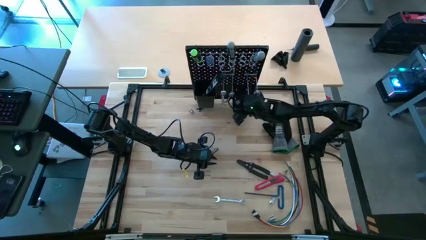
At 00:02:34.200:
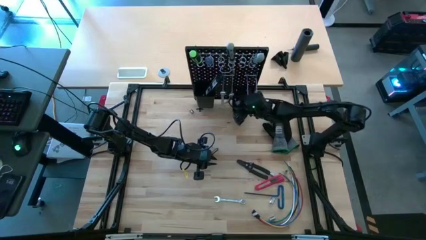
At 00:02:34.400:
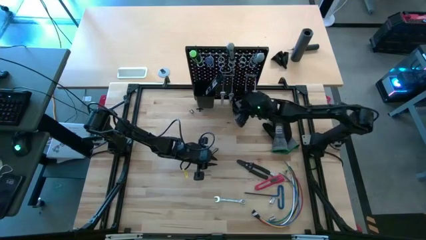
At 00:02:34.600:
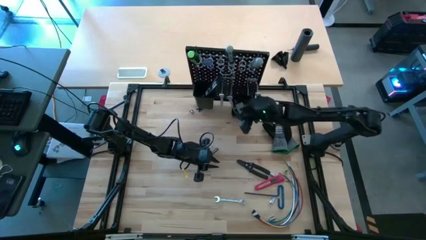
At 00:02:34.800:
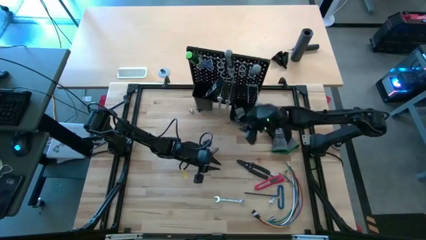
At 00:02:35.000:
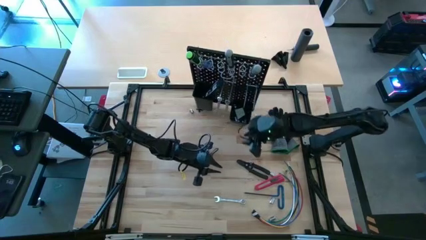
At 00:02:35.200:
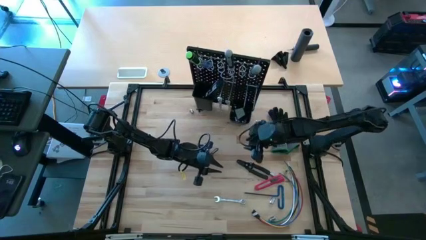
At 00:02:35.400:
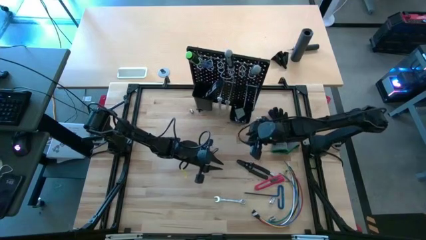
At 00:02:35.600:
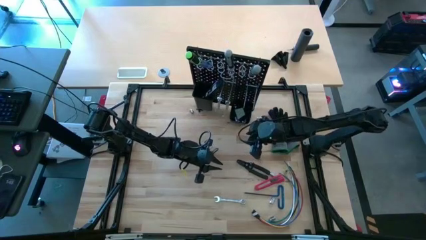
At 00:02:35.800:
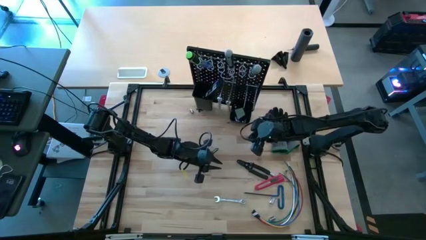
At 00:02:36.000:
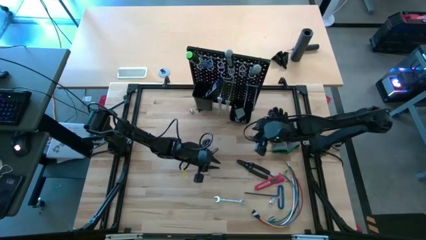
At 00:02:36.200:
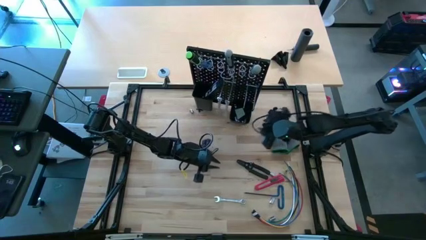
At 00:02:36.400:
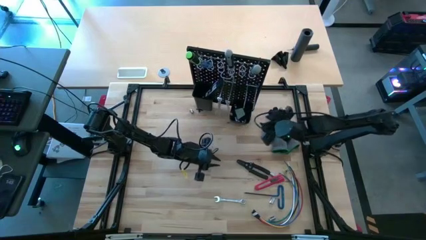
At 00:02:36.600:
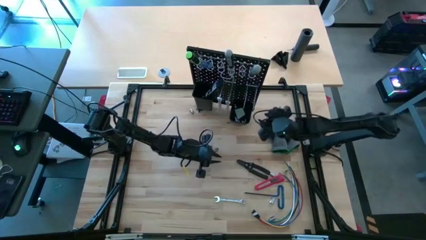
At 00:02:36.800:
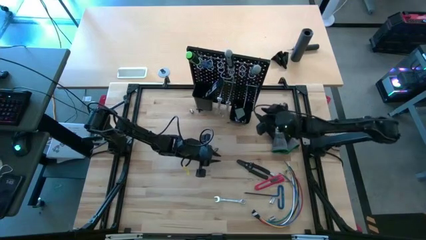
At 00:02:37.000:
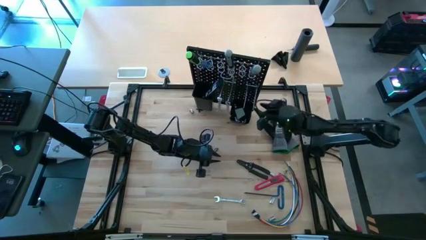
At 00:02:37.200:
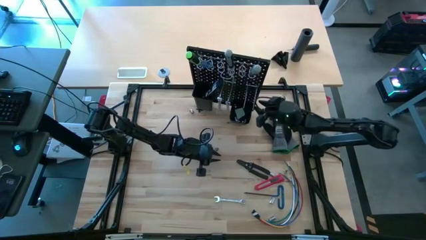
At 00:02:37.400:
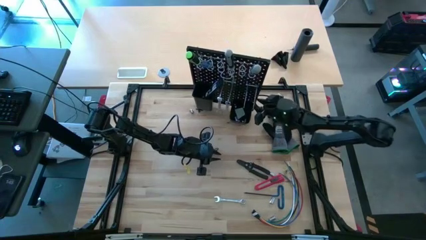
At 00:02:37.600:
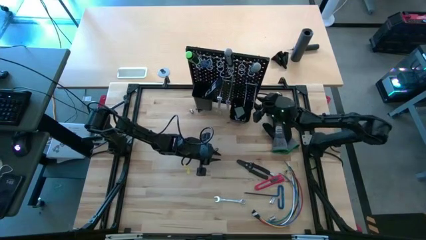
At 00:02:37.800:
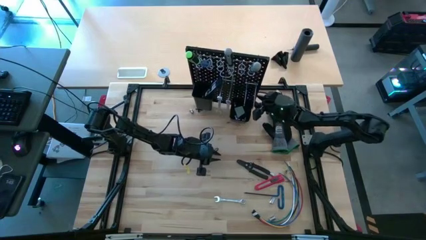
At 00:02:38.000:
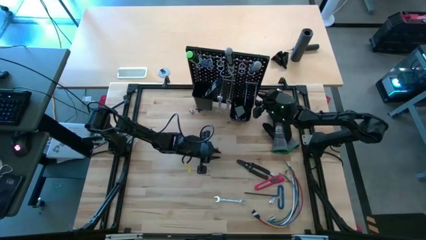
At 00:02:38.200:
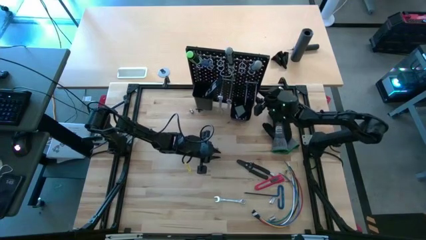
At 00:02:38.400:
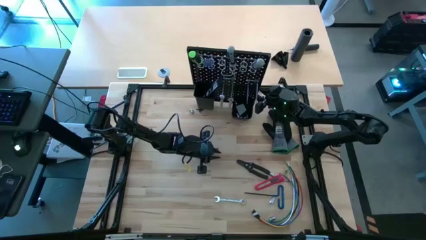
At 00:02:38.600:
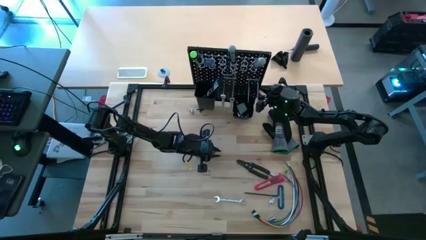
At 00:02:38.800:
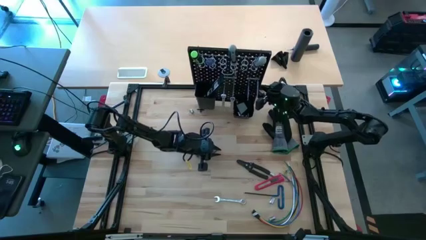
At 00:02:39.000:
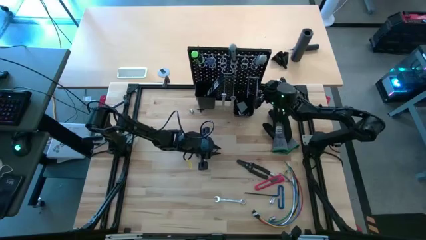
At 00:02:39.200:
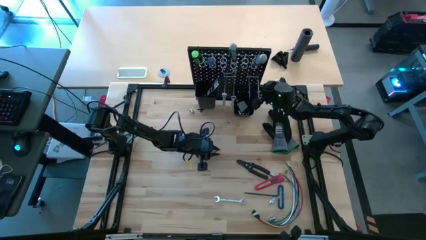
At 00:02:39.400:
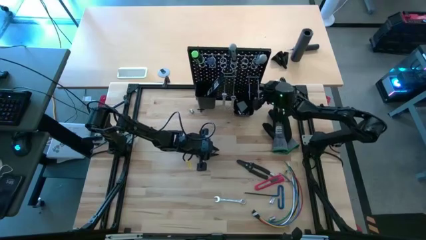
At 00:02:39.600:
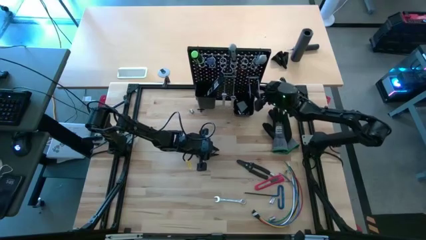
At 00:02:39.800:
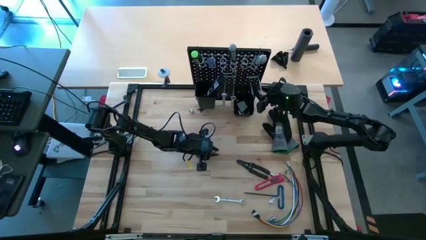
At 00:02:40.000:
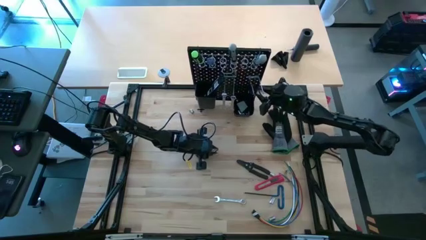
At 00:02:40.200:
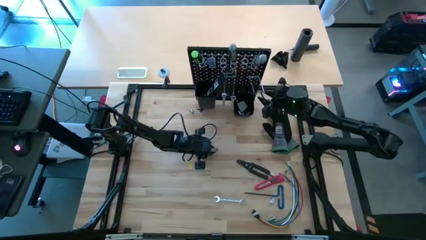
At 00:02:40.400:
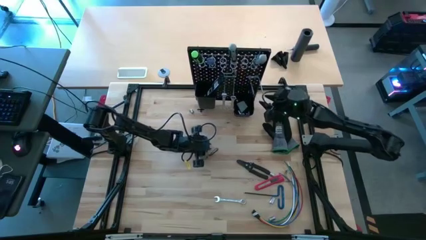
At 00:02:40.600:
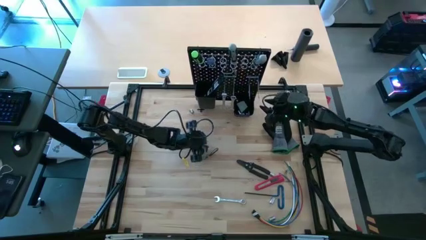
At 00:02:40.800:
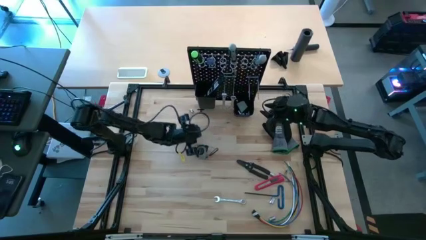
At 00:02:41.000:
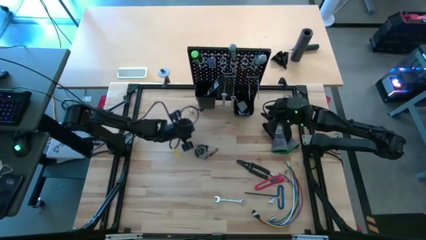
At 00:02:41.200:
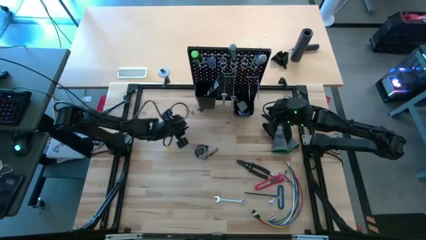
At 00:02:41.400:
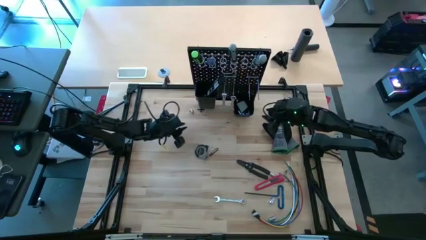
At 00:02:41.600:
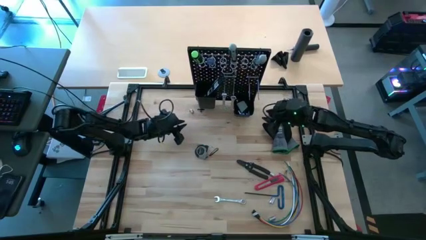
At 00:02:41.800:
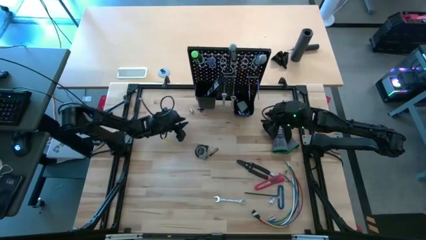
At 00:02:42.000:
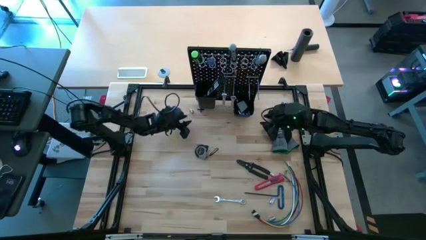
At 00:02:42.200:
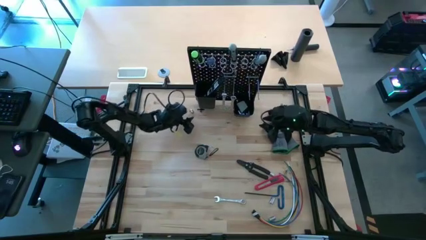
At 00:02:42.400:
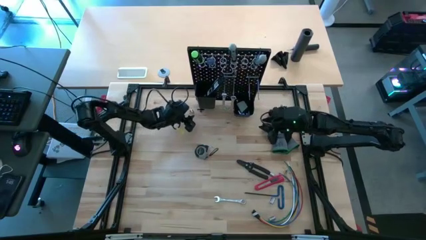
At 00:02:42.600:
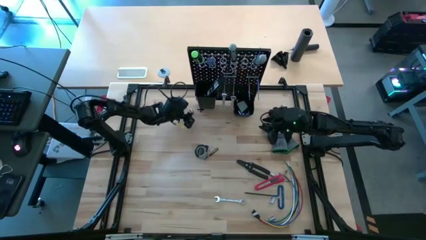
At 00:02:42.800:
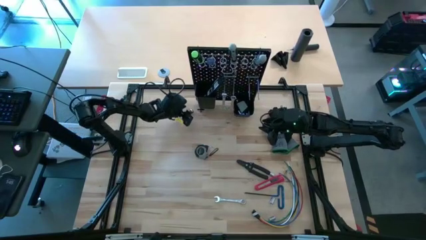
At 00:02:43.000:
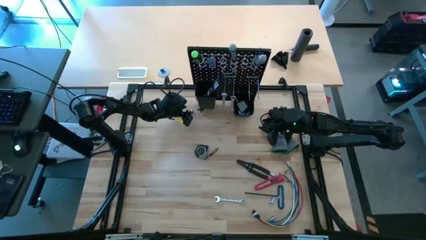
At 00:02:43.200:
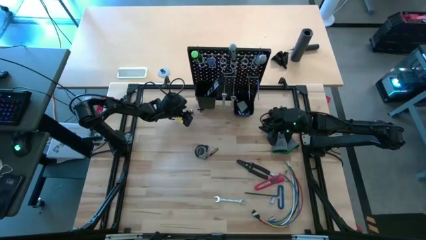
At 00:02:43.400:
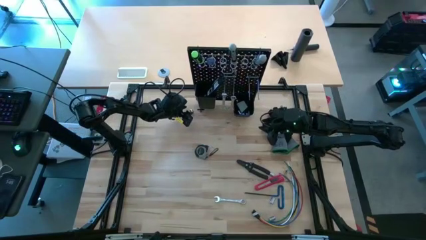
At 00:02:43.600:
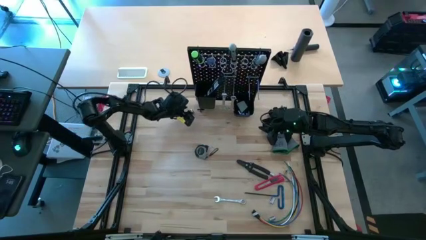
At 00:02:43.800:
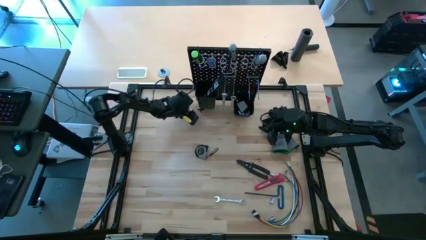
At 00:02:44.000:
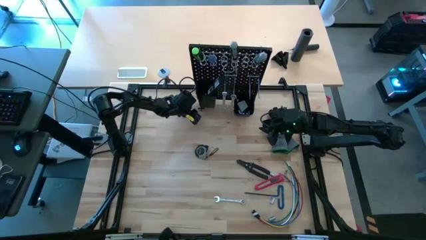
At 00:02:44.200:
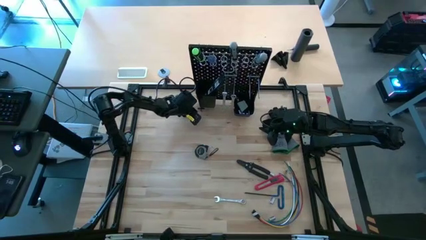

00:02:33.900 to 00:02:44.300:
Task: Hang tools onto peg board
Put the silver socket driver on the right black bin on the peg board

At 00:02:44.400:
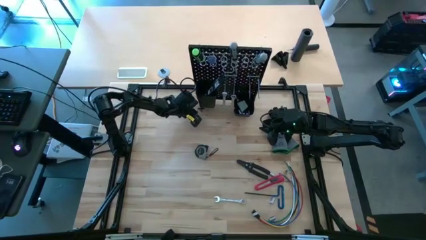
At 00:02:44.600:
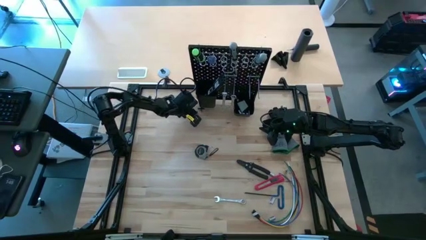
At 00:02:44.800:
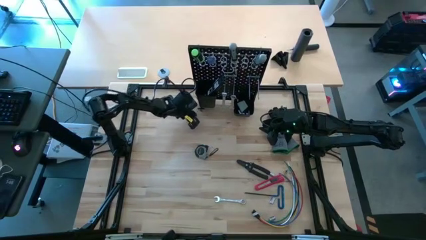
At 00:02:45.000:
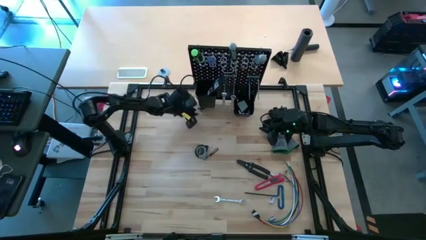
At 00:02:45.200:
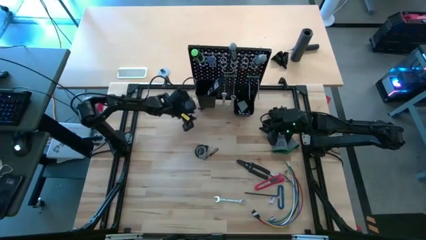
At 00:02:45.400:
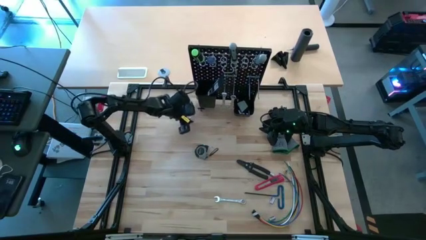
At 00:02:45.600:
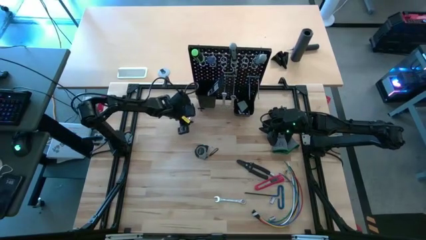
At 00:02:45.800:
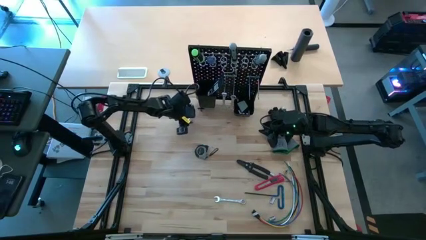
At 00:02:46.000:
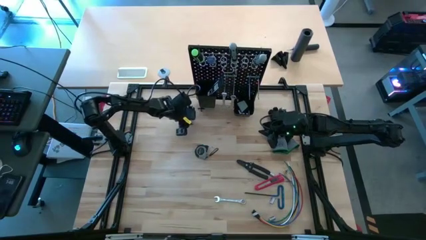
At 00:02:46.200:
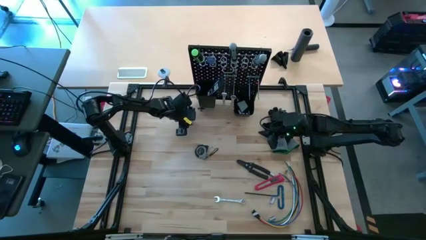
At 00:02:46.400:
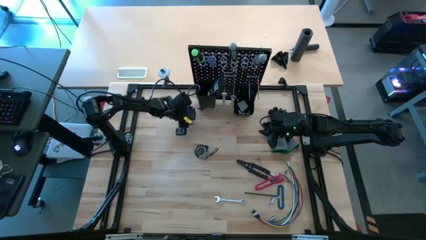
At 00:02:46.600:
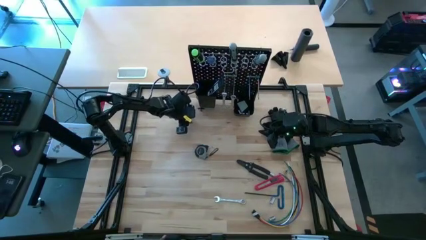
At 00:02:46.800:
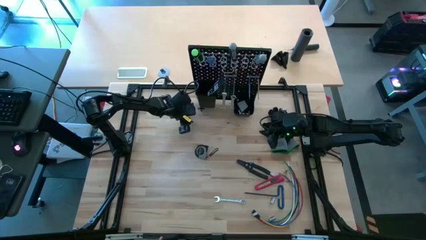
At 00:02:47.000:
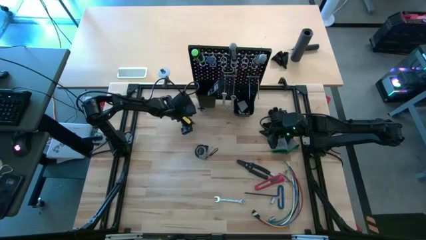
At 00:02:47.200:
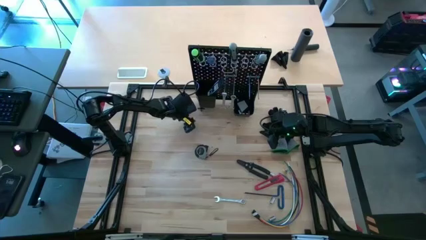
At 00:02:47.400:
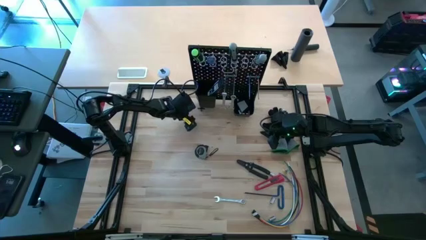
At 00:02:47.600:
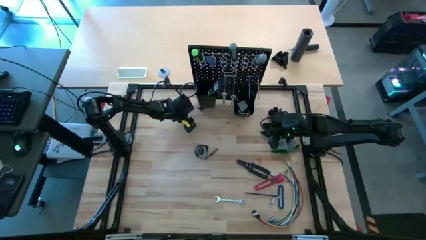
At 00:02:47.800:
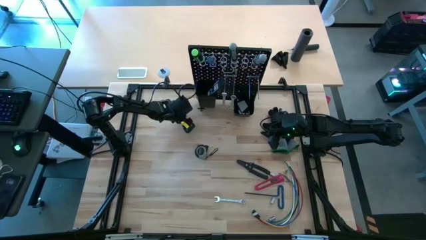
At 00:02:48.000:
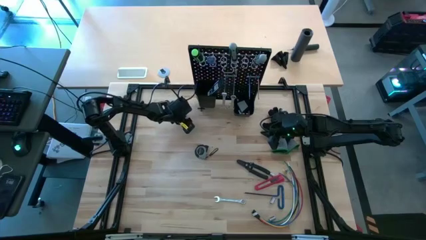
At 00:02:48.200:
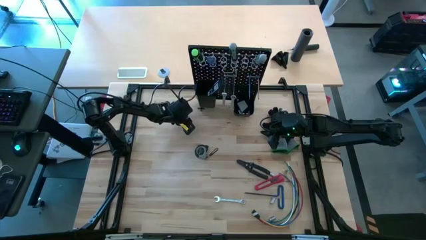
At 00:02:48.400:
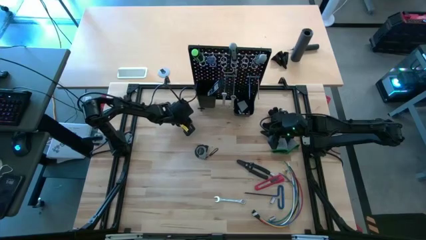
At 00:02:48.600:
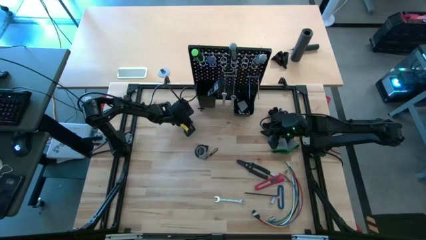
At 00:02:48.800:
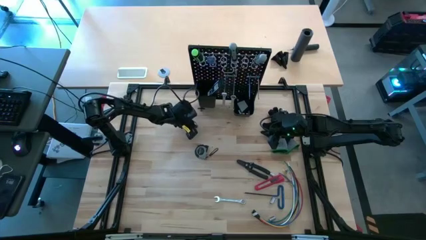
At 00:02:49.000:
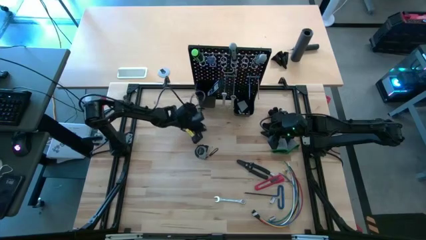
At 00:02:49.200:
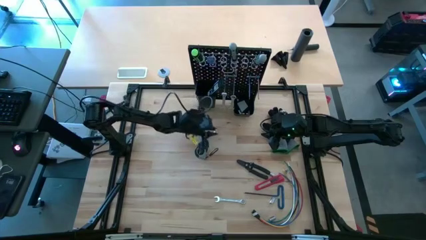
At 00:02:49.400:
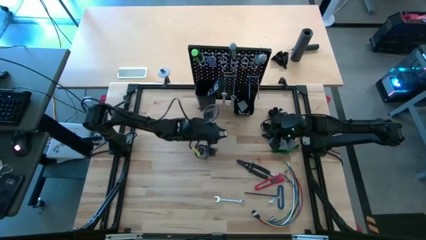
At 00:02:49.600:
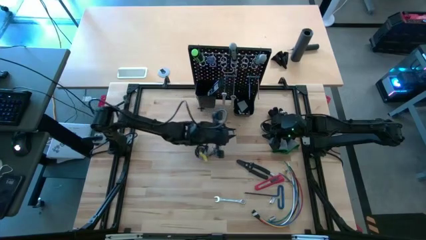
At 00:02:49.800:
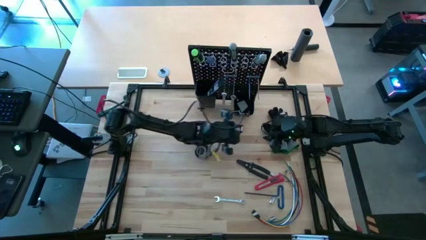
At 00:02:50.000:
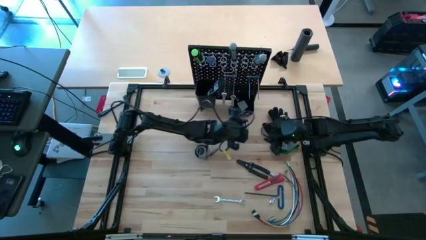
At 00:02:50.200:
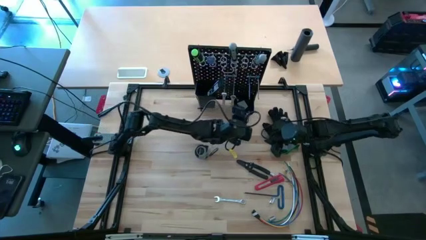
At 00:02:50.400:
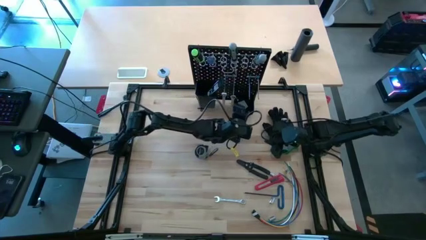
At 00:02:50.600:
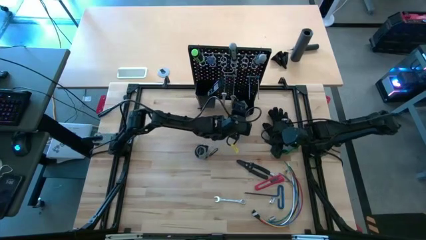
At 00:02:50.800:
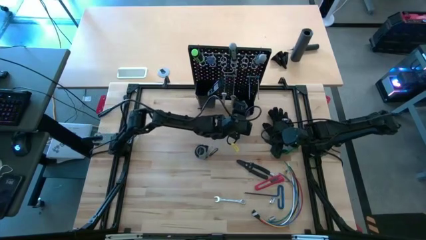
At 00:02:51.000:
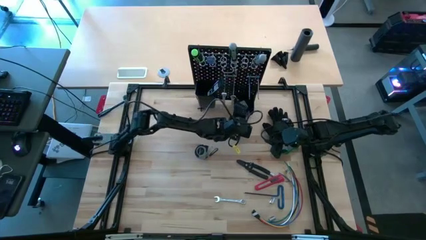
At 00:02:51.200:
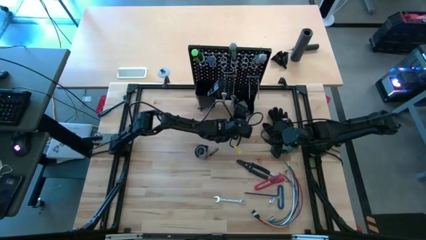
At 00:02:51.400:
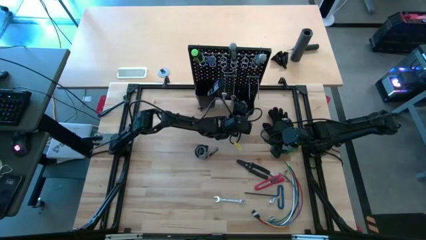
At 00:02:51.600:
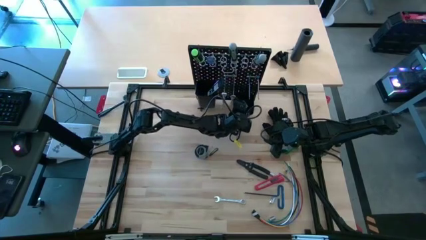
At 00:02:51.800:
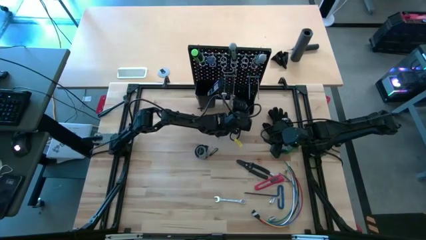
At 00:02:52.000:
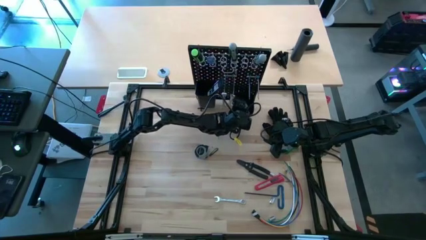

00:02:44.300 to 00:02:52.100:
Put the silver socket on the right black bin on the peg board
